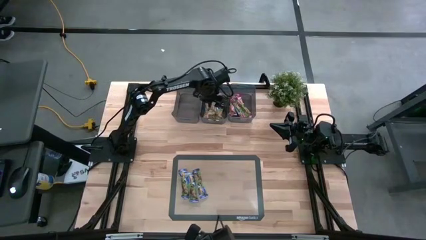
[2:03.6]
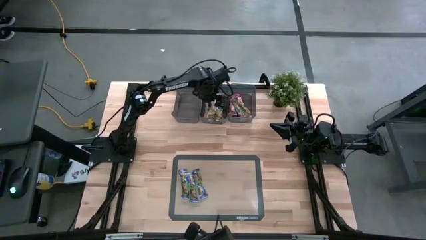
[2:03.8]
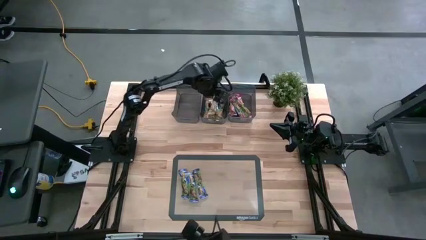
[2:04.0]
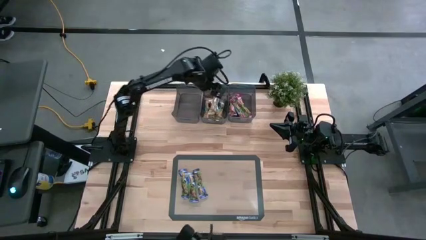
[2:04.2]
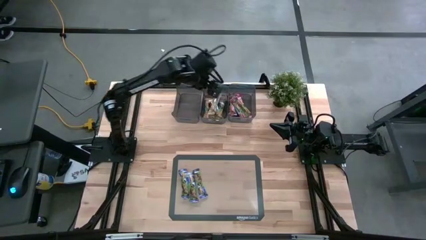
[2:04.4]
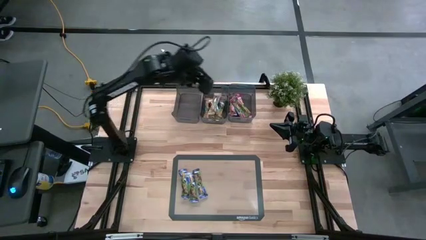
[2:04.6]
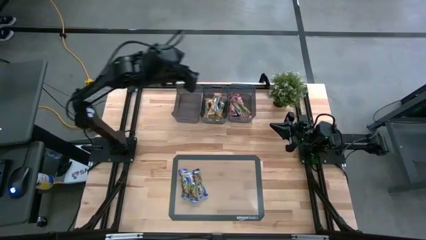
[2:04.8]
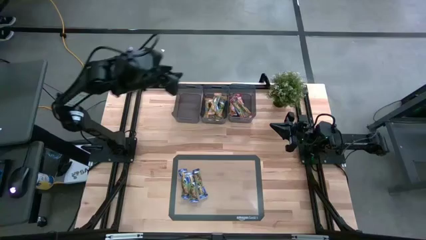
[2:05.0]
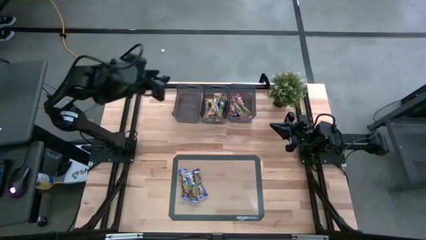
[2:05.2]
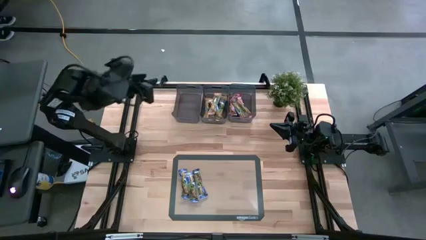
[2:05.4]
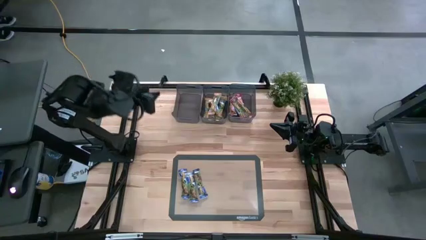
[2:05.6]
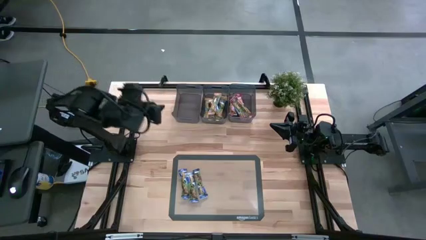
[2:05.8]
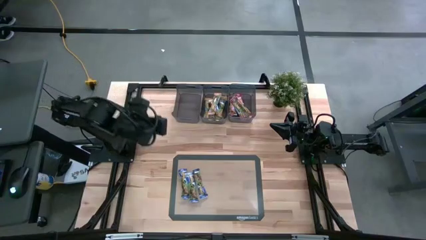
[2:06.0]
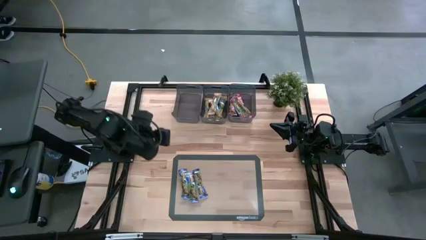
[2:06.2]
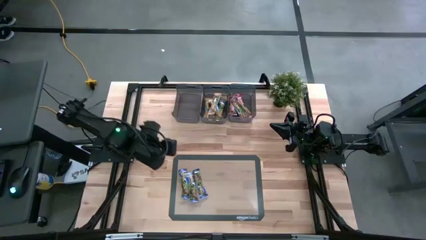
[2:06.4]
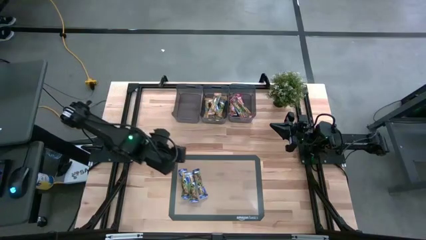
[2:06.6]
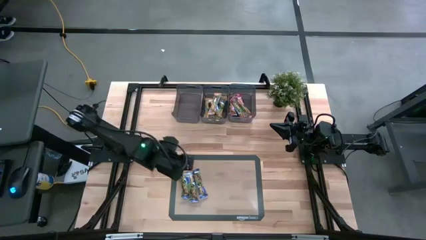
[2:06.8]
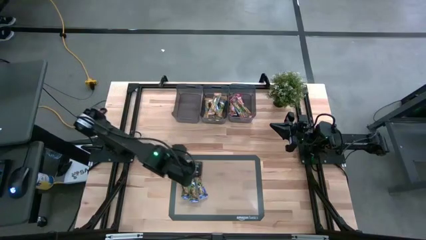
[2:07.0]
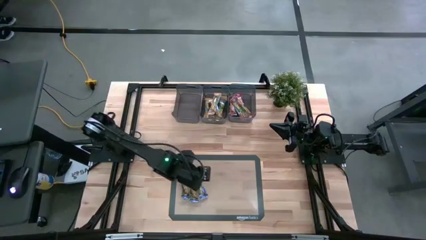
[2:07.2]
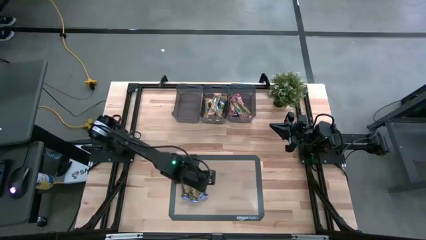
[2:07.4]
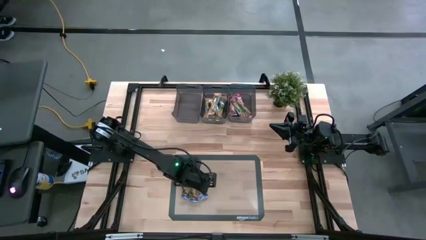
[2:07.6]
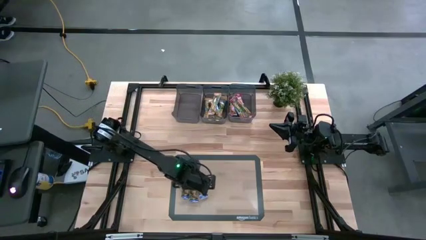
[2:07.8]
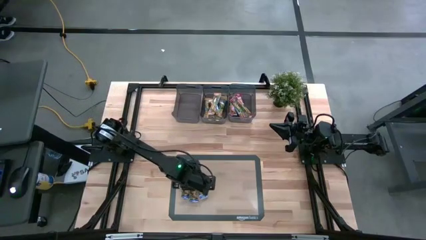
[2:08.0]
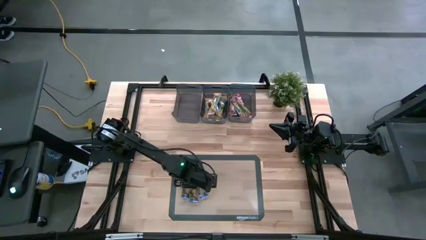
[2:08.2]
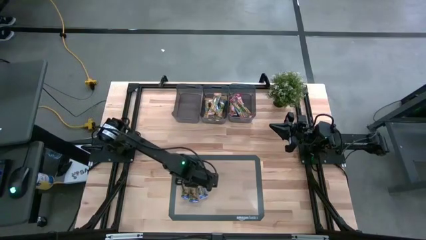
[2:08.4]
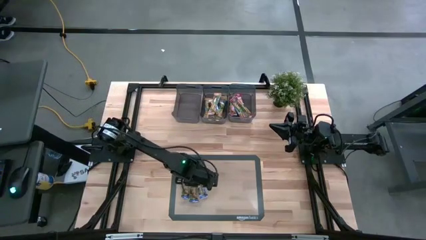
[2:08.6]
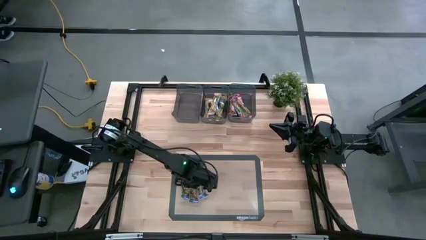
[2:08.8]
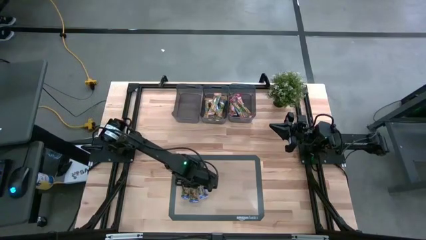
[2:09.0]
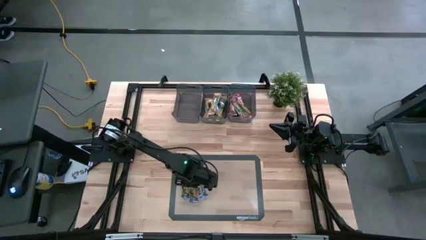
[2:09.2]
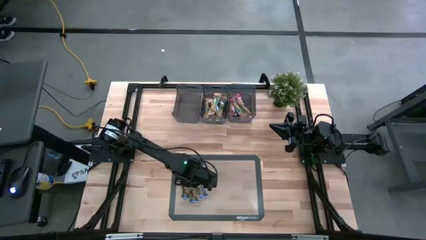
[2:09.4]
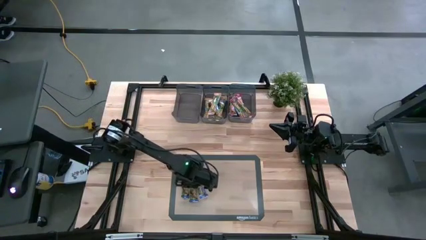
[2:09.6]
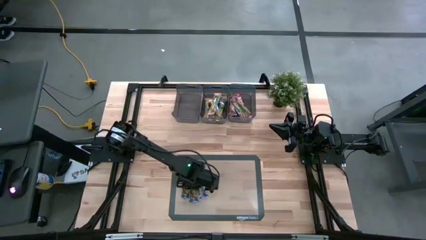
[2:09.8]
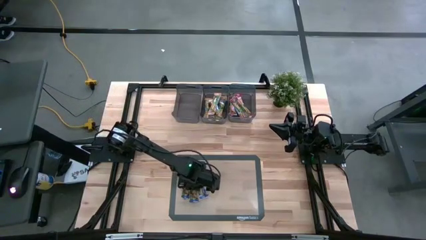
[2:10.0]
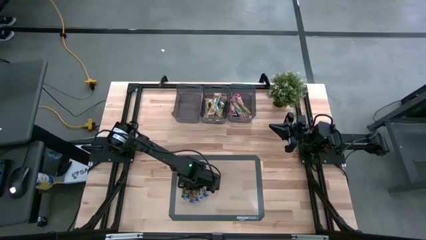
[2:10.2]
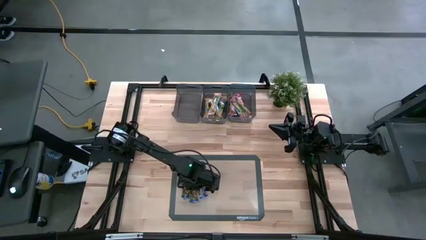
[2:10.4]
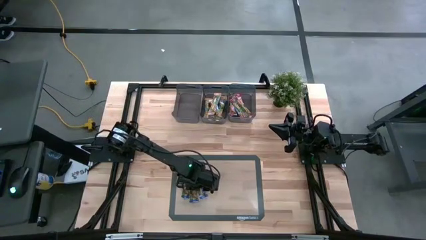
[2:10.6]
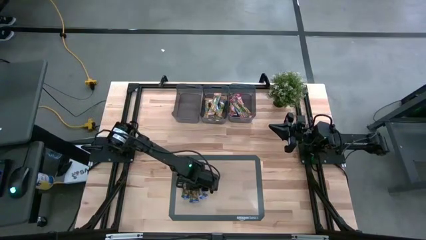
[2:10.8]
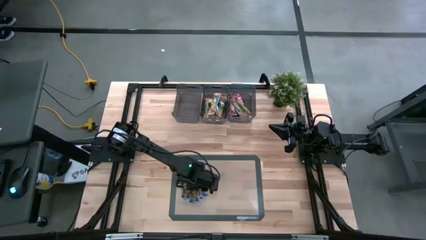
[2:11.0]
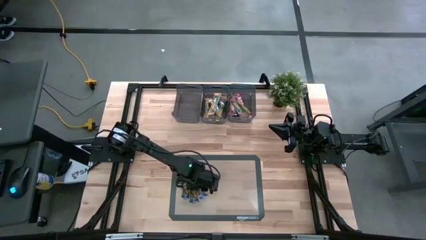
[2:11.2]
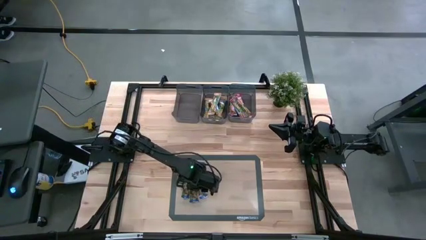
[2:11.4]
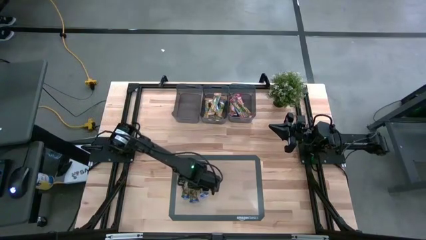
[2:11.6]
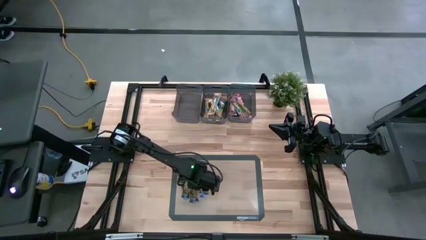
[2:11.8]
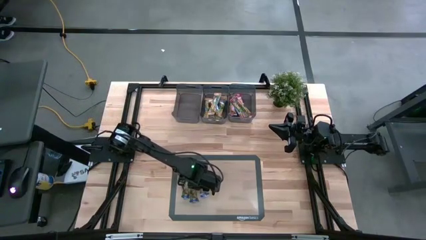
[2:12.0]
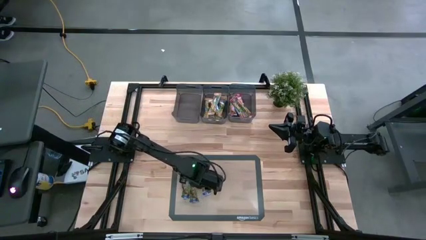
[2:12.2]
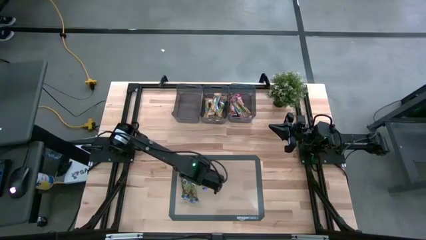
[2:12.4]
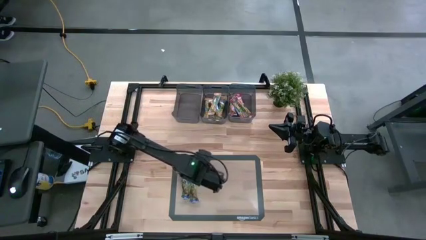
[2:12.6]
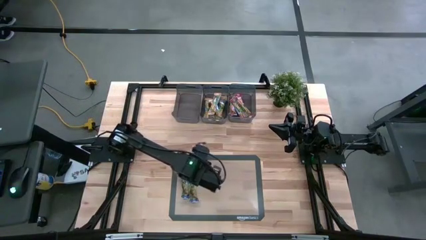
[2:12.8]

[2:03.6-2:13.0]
Task: Pick and place Granola Bars by type
Put the blue granola bar into the left black bin

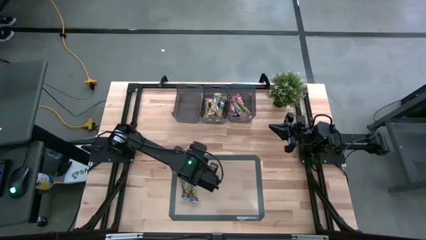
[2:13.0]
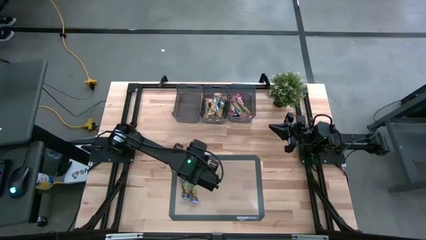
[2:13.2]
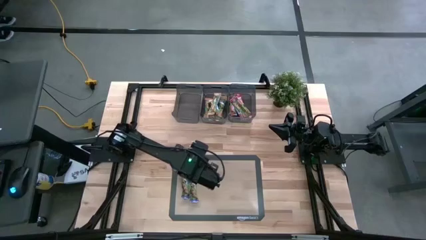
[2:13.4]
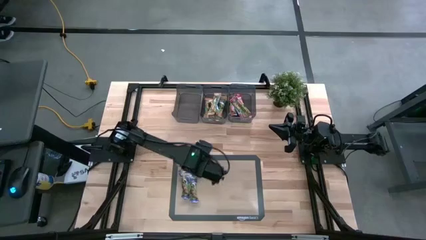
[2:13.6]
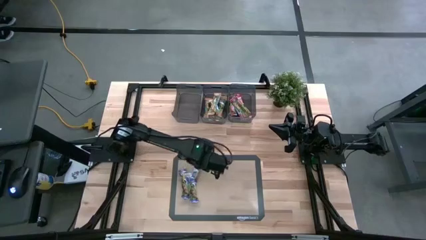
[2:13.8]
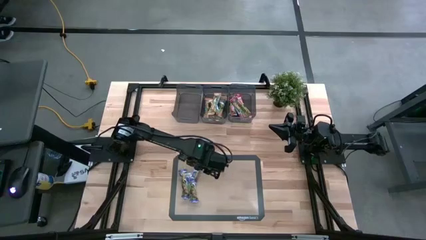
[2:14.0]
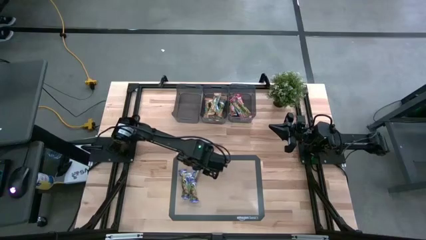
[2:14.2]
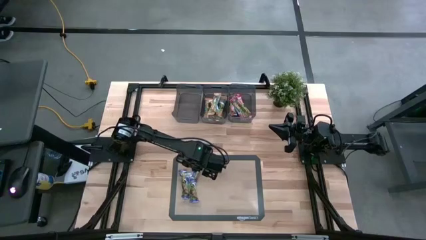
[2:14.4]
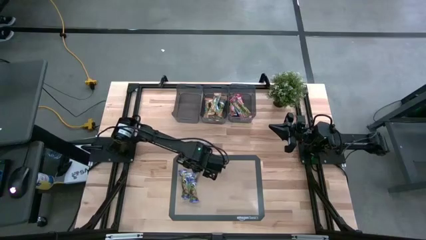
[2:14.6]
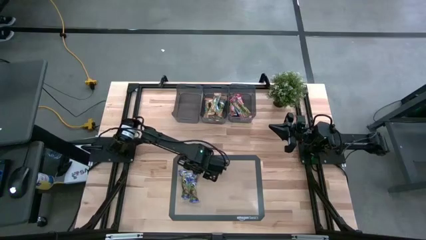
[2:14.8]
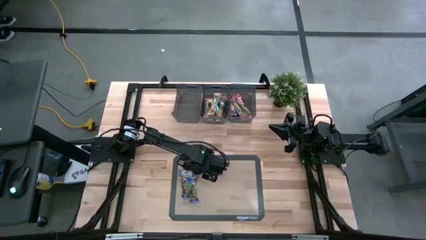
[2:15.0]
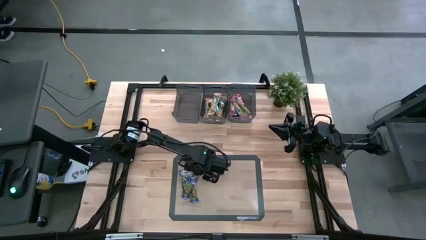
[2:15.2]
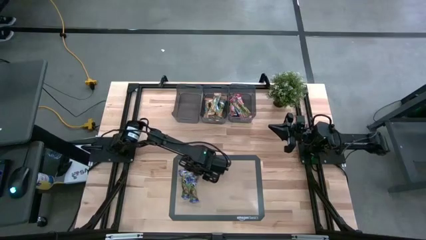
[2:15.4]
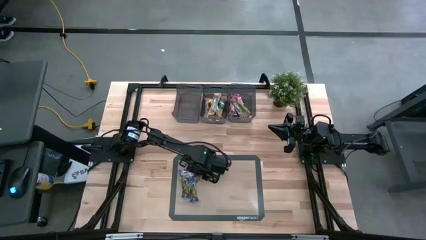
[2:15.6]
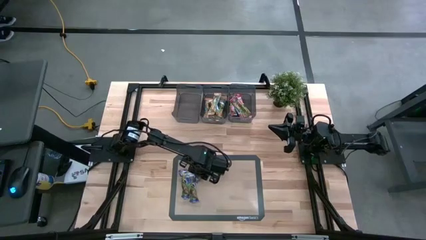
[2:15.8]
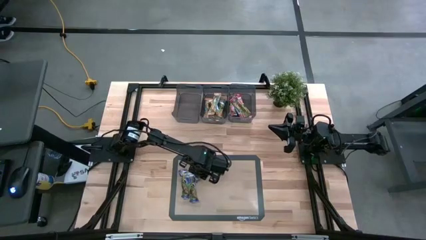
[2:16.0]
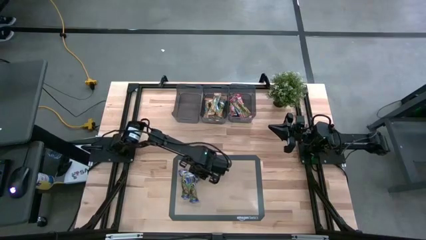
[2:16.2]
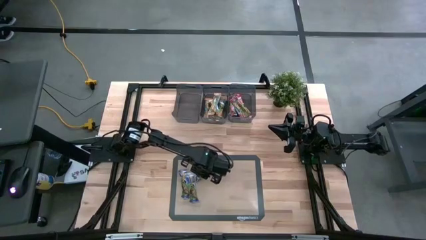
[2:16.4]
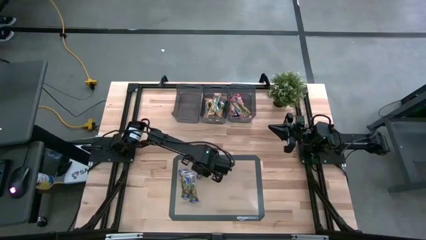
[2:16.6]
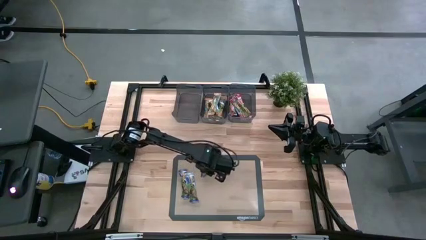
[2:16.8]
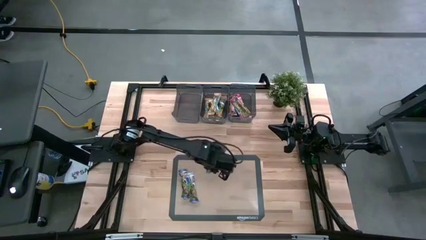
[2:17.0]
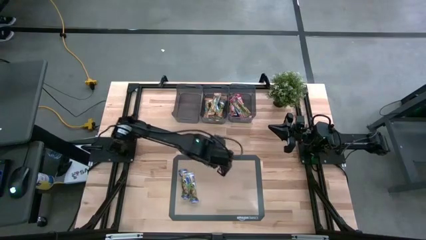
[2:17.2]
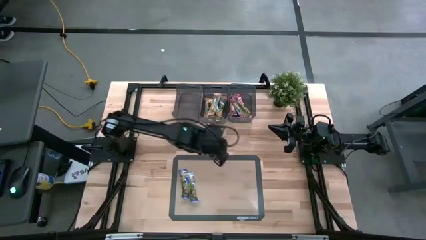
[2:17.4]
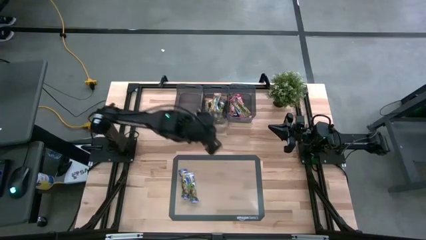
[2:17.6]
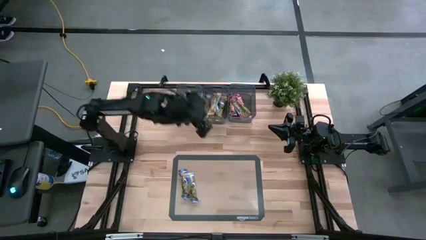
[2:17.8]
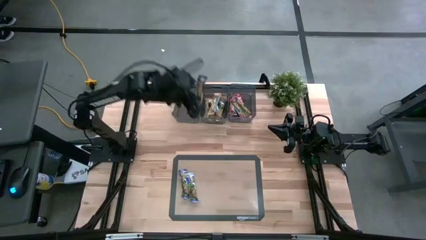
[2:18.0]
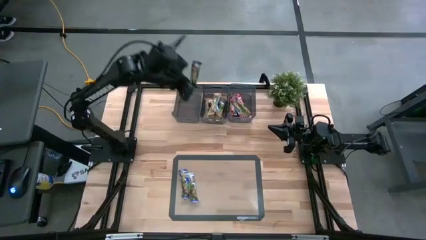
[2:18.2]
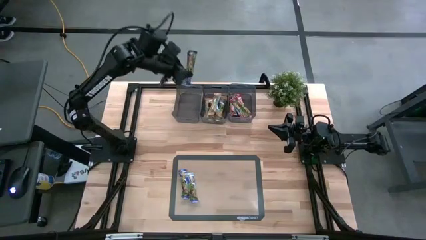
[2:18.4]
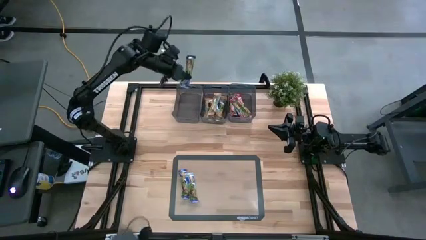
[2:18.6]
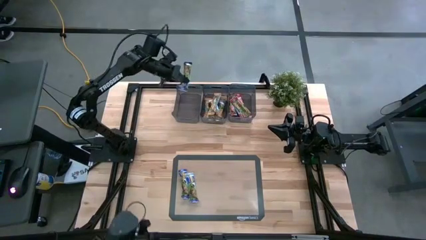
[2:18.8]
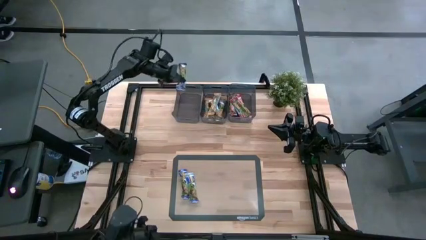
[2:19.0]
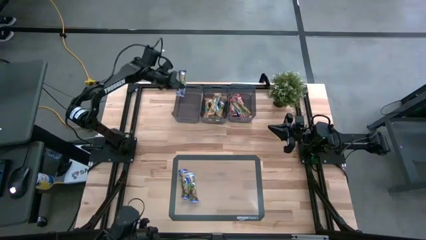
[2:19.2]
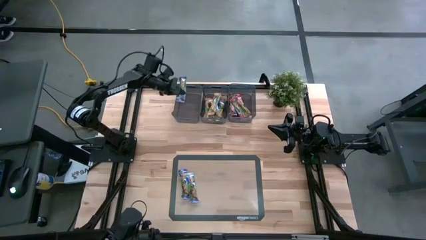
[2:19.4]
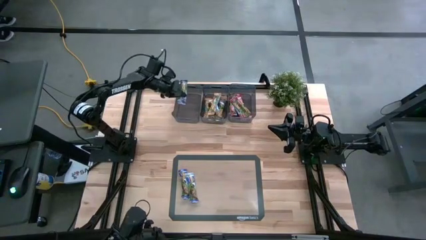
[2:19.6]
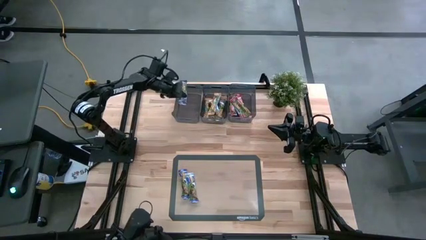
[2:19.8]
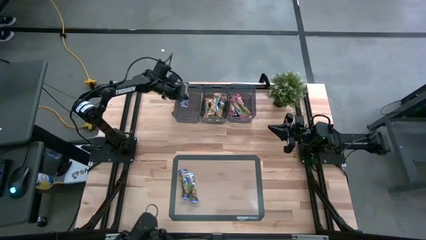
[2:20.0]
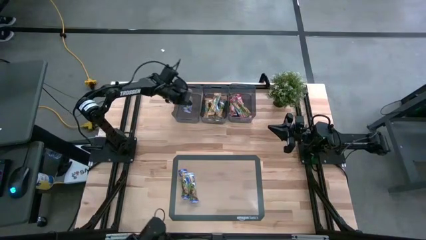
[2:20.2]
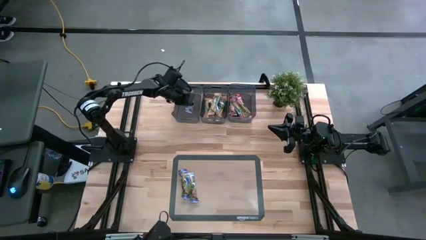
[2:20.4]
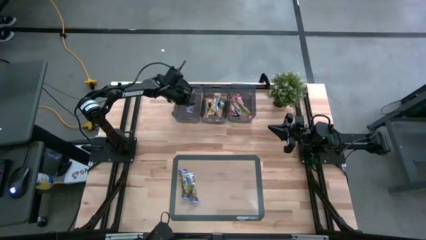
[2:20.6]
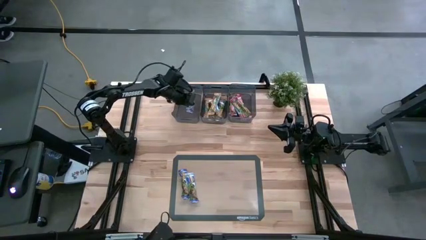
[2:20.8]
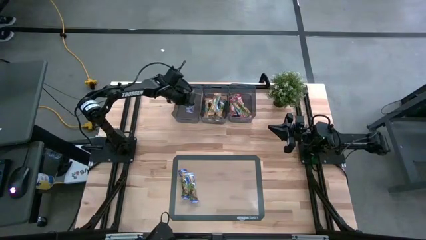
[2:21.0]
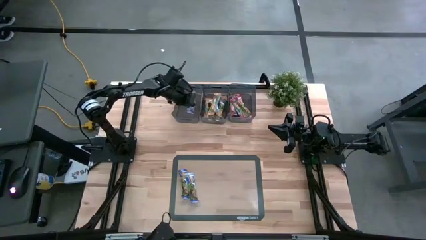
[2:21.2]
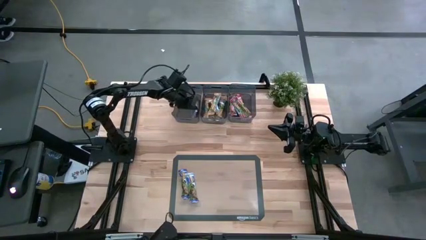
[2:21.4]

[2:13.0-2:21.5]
Put the blue granola bar into the left black bin
